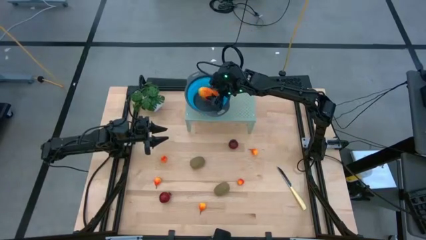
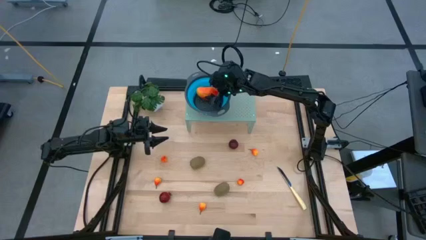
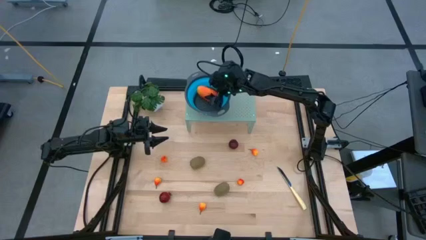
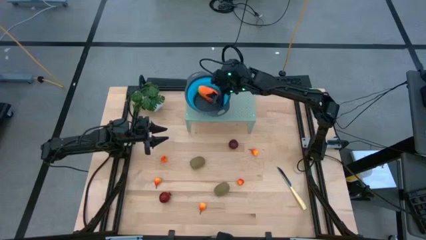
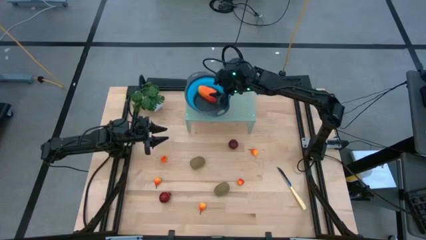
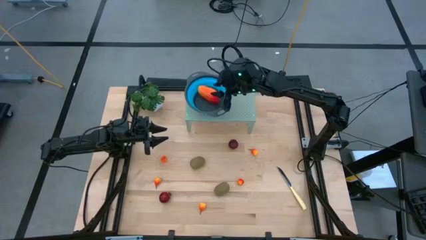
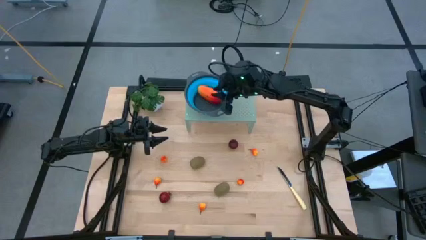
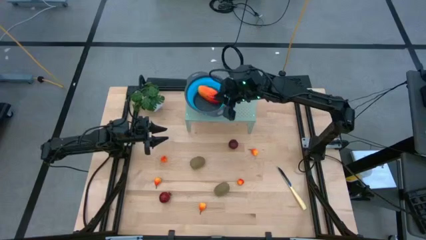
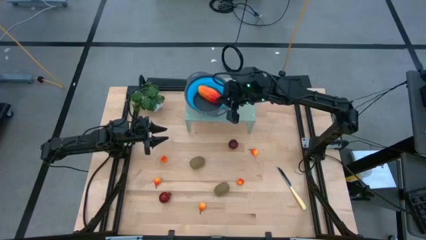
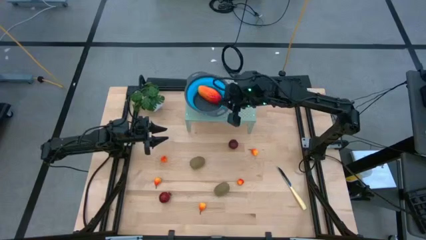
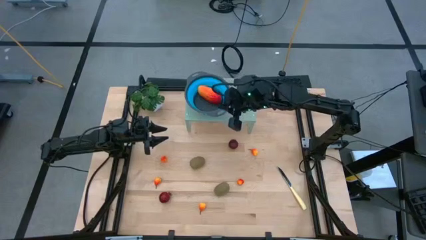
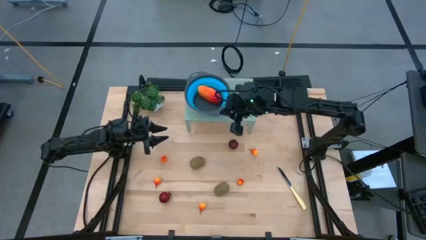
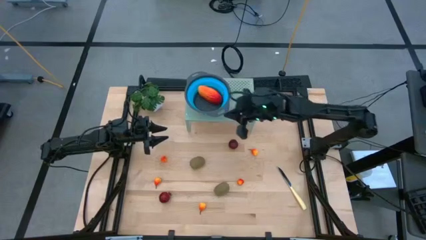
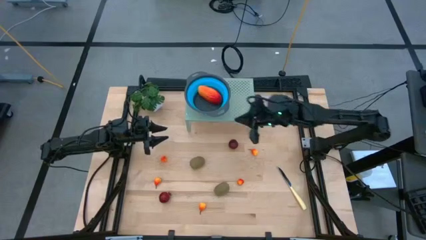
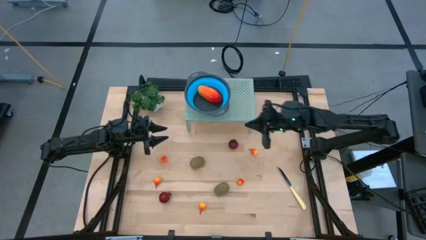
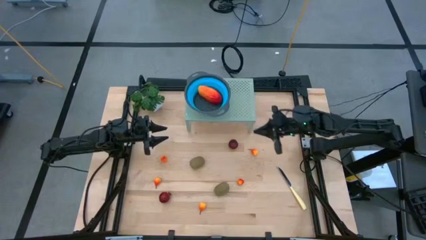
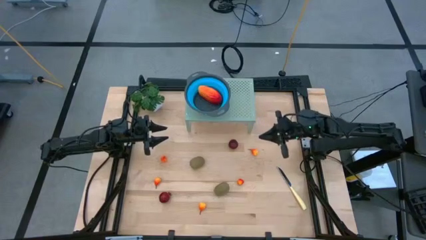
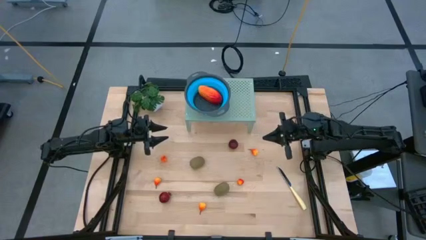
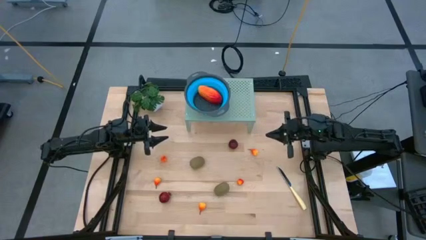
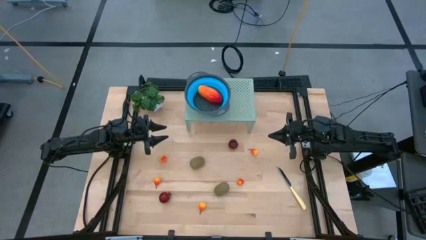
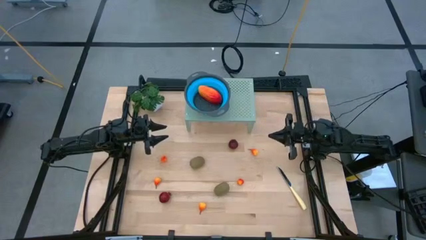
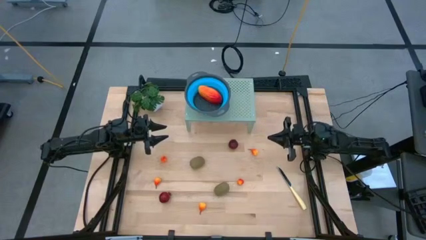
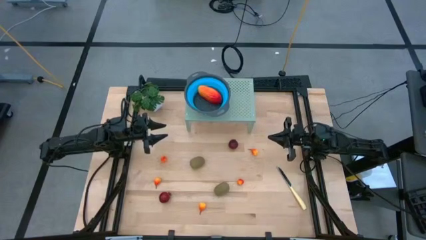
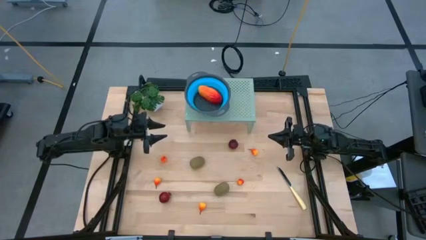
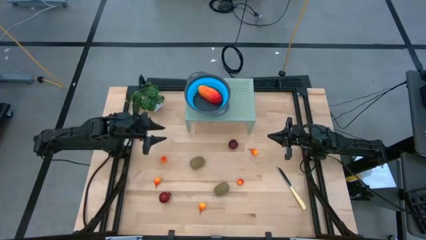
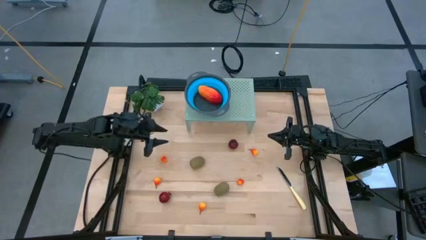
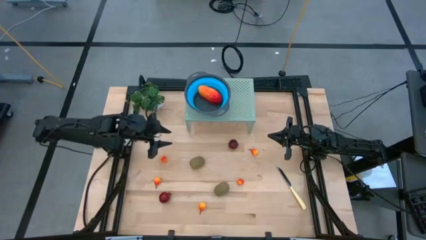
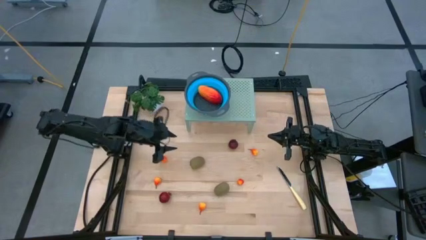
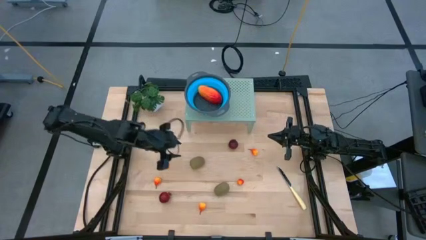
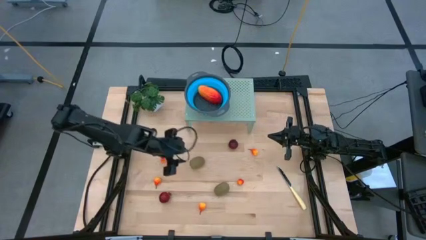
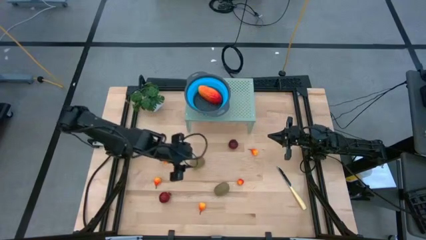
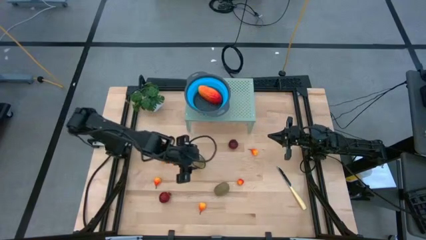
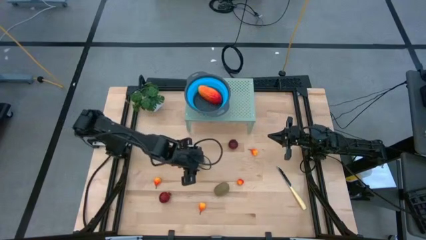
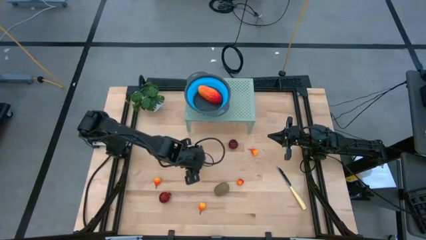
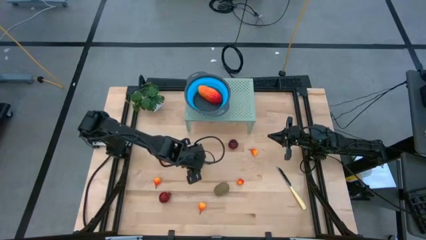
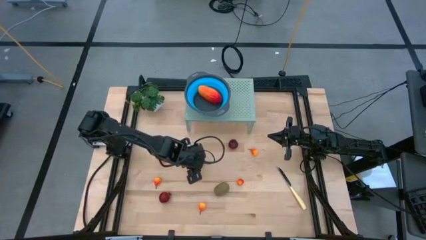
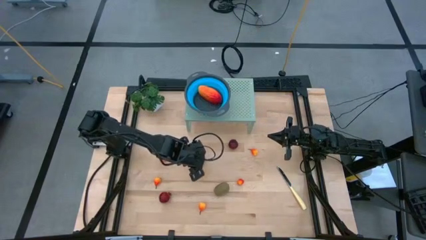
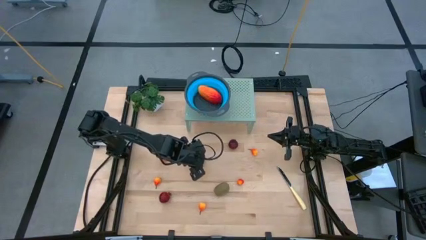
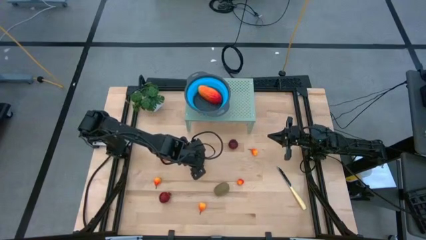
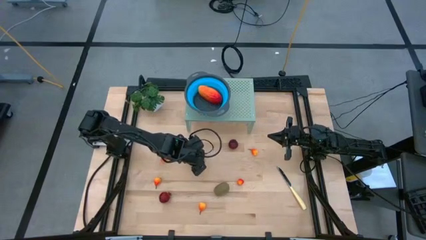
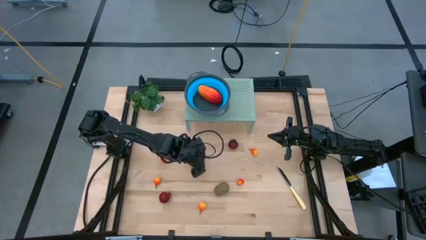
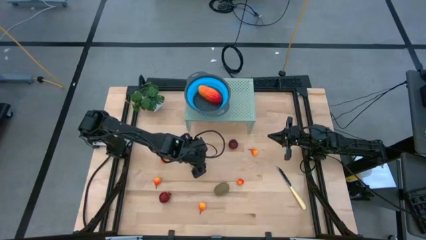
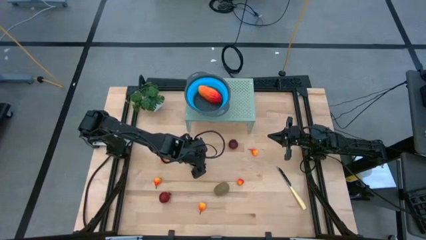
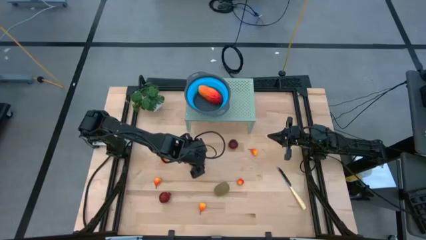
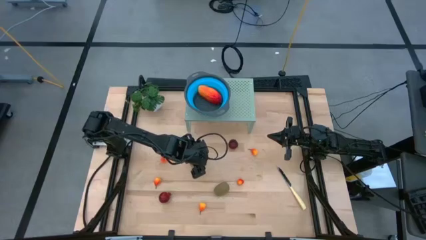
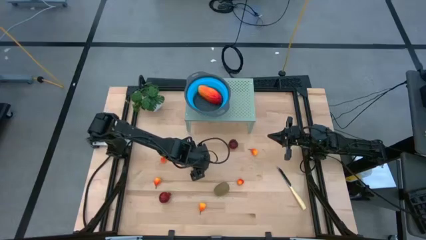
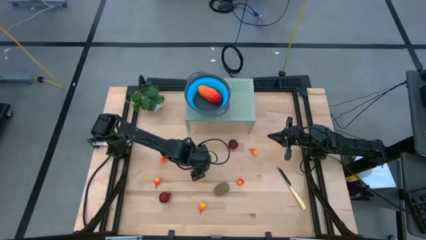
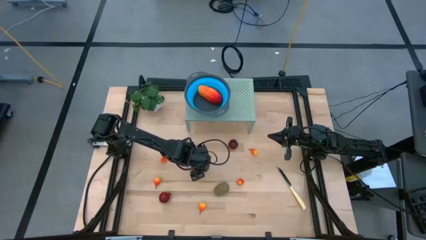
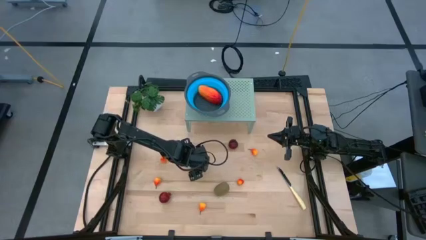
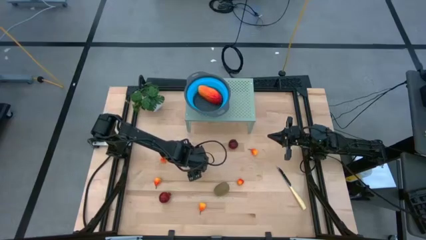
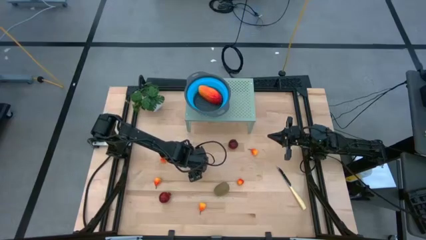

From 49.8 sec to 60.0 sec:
Task: Pick & Place Fruit
Put the brown kiwi into the blue bowl on the shelf
